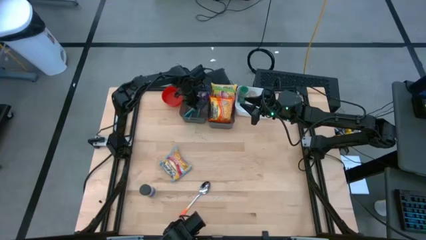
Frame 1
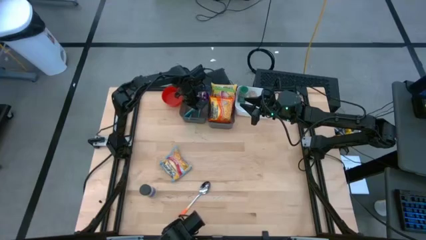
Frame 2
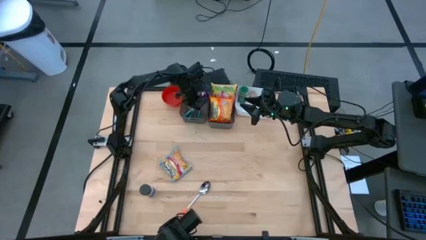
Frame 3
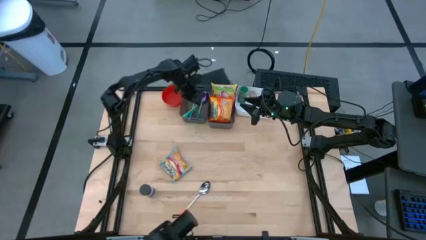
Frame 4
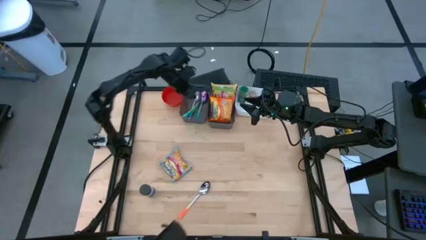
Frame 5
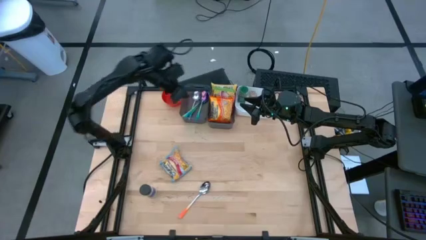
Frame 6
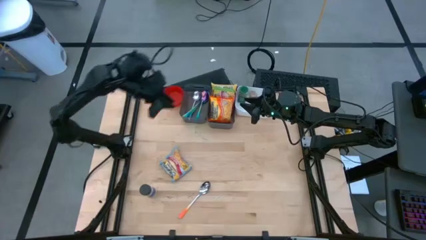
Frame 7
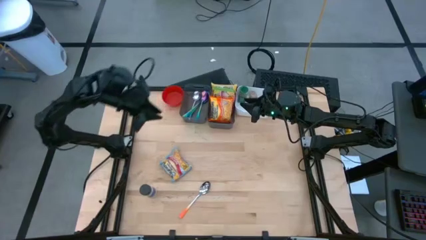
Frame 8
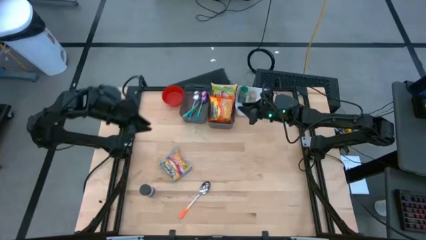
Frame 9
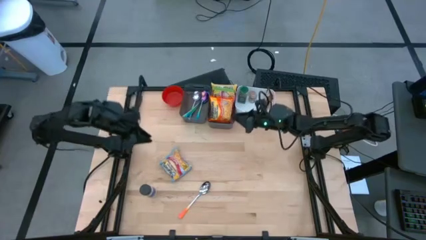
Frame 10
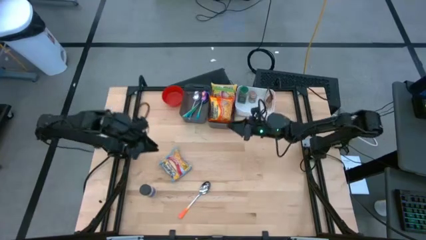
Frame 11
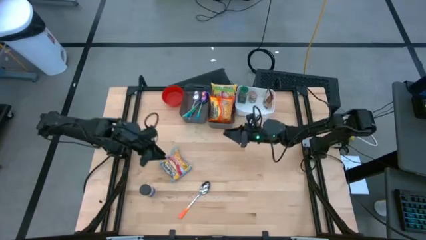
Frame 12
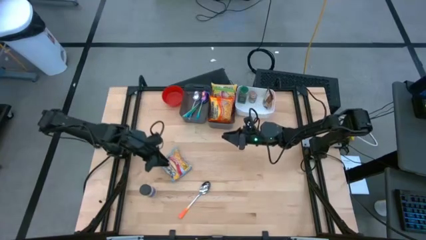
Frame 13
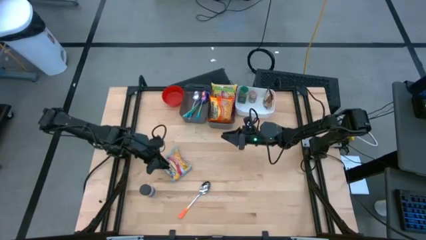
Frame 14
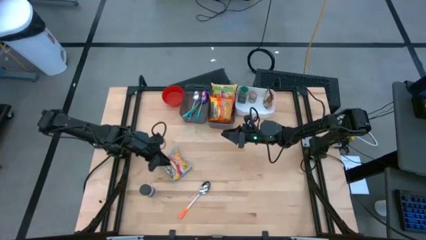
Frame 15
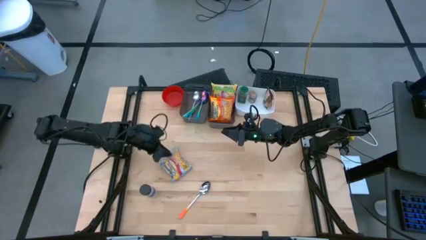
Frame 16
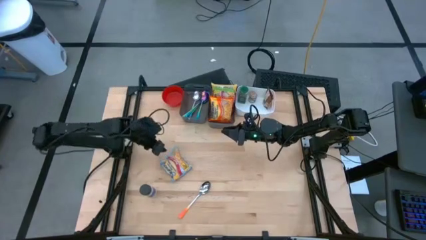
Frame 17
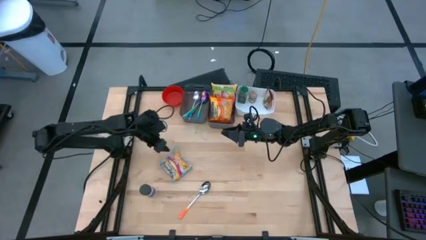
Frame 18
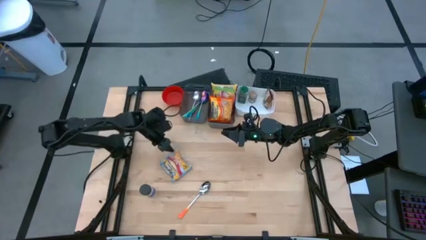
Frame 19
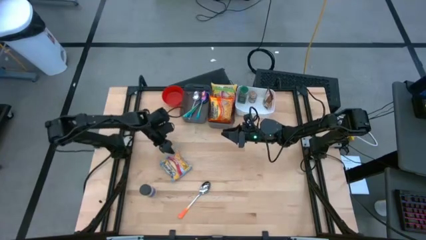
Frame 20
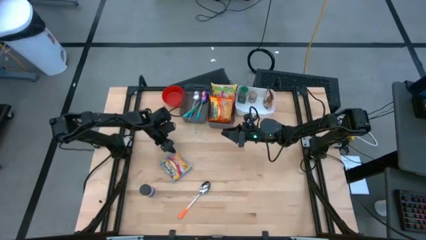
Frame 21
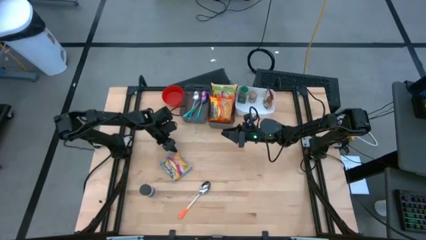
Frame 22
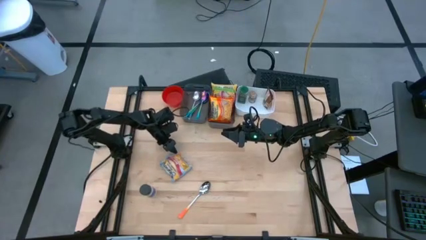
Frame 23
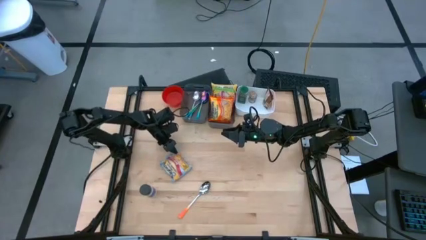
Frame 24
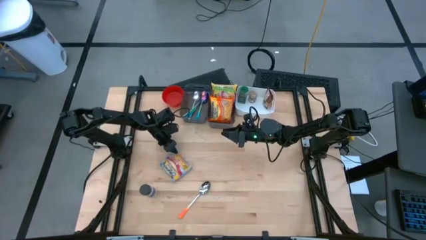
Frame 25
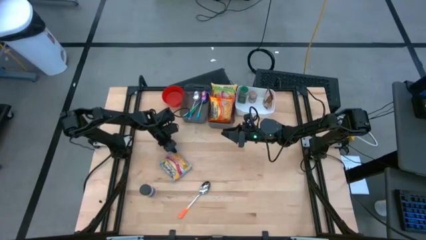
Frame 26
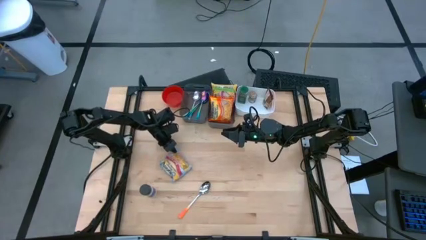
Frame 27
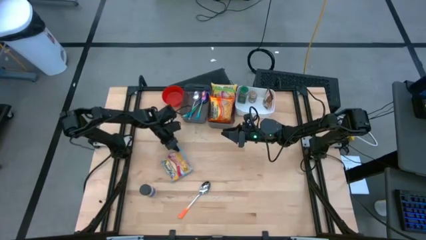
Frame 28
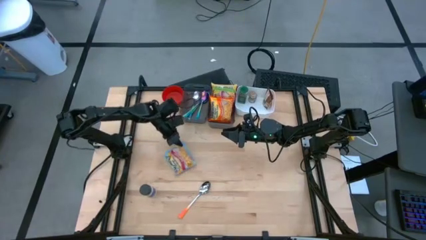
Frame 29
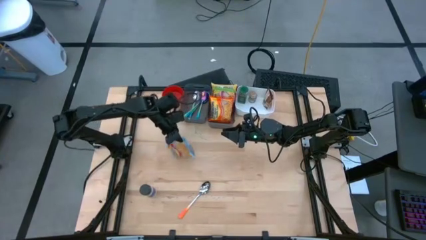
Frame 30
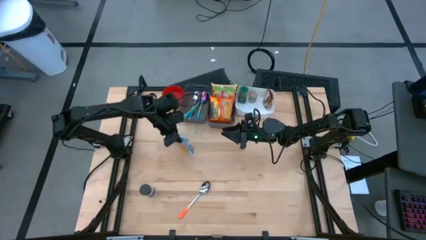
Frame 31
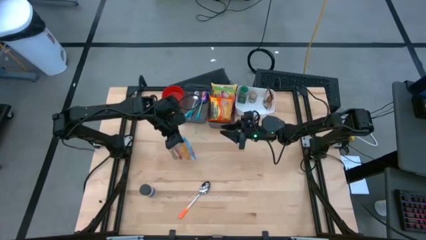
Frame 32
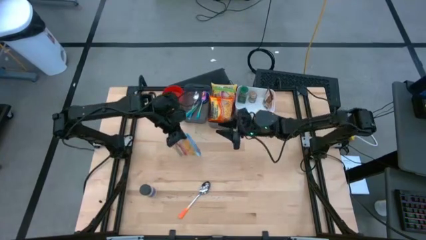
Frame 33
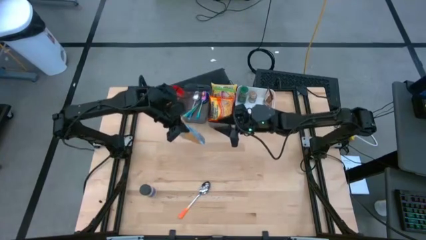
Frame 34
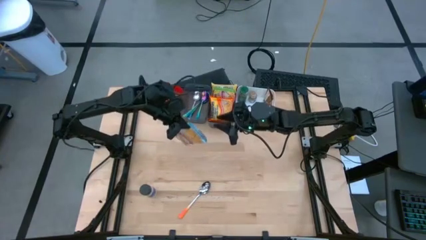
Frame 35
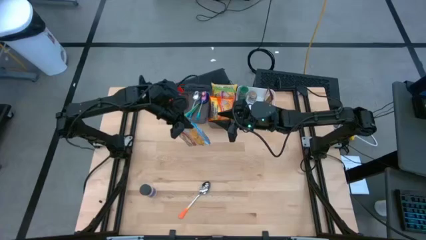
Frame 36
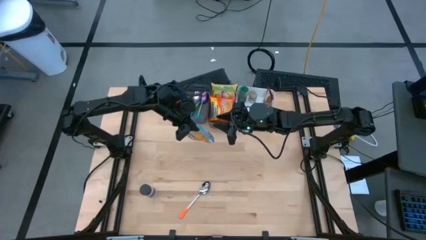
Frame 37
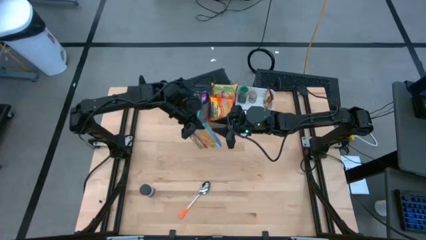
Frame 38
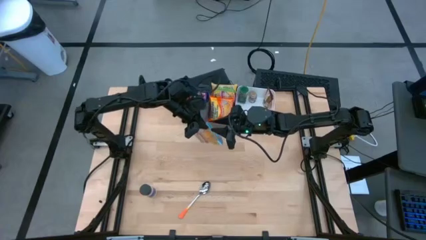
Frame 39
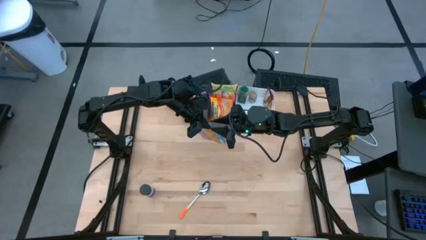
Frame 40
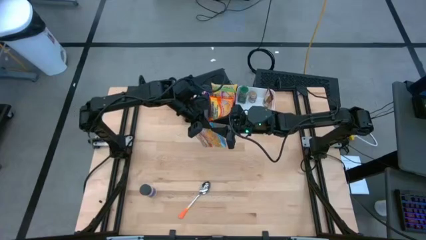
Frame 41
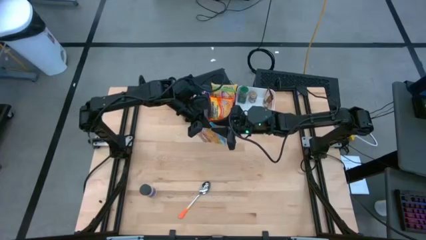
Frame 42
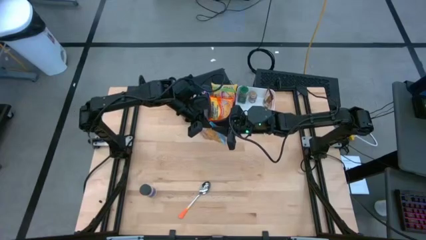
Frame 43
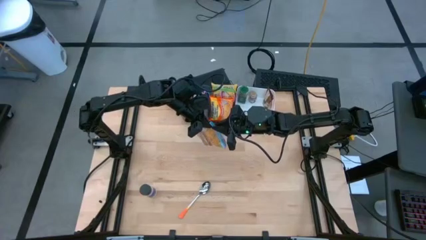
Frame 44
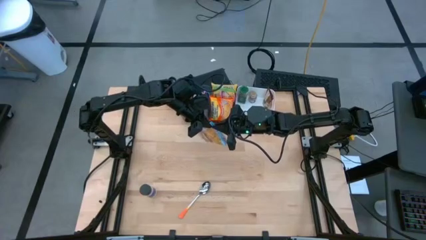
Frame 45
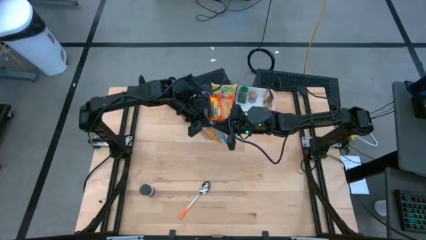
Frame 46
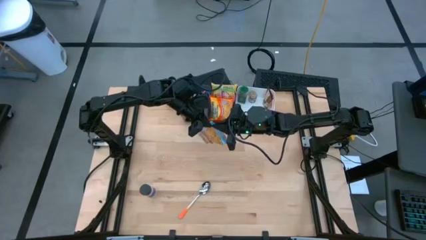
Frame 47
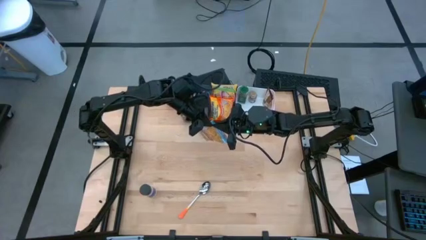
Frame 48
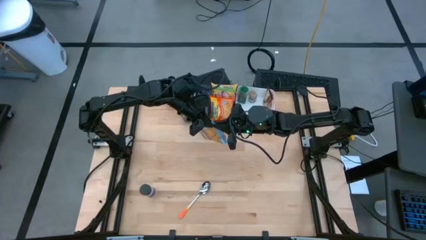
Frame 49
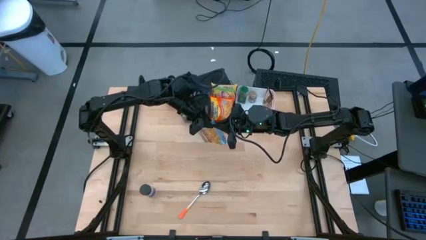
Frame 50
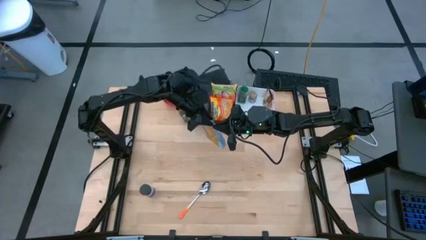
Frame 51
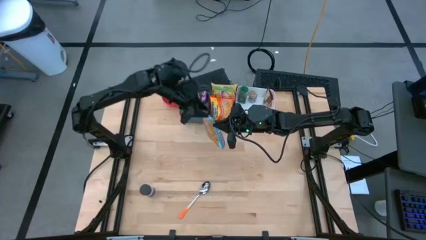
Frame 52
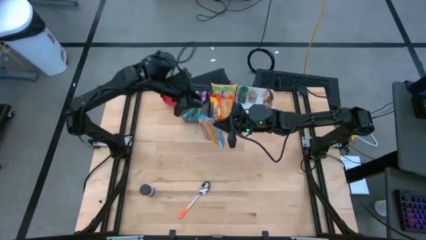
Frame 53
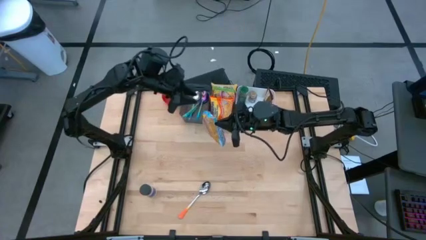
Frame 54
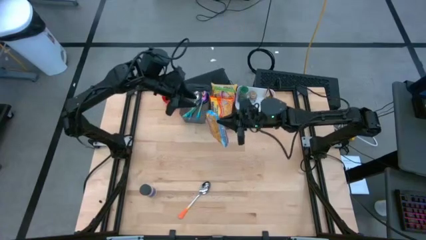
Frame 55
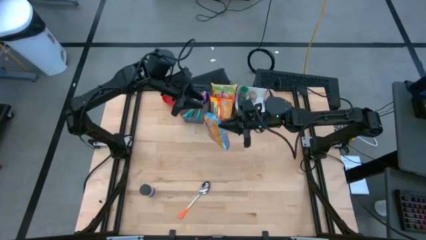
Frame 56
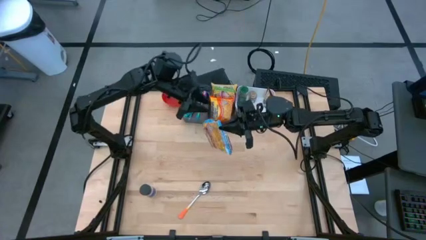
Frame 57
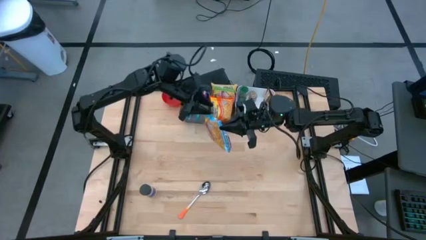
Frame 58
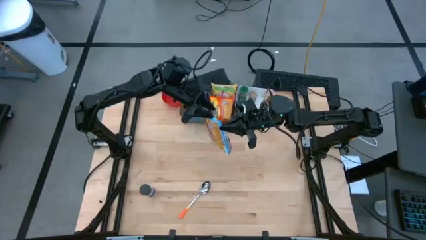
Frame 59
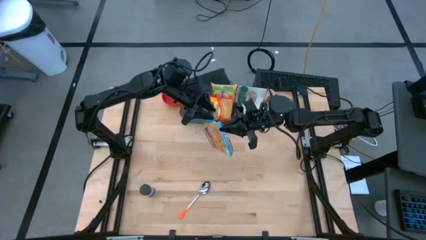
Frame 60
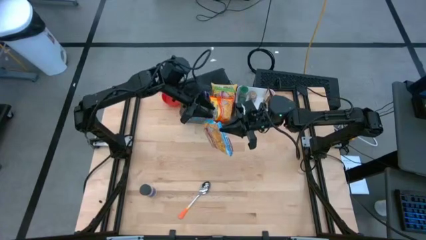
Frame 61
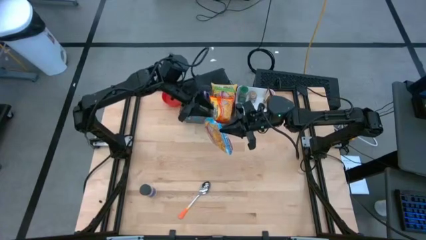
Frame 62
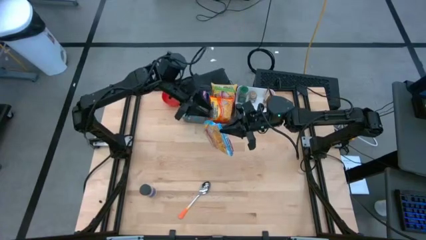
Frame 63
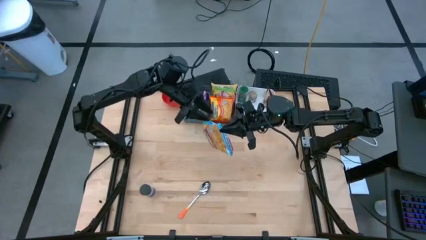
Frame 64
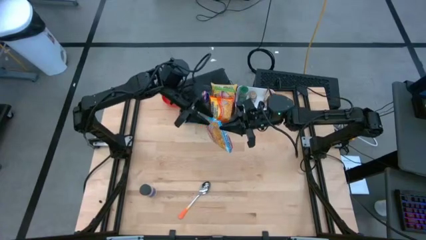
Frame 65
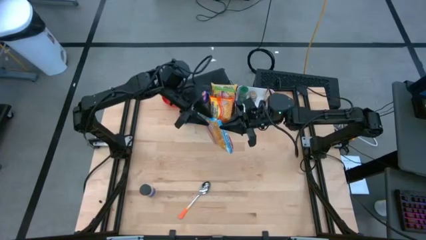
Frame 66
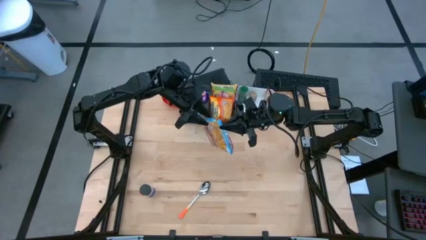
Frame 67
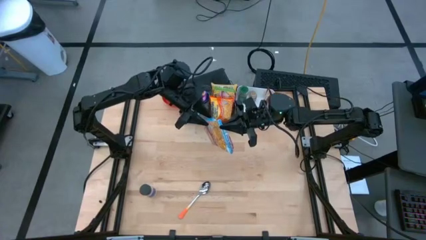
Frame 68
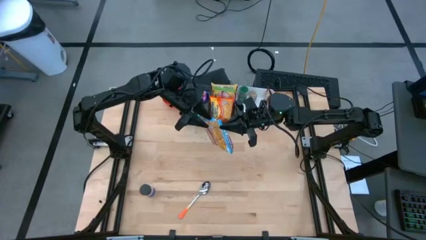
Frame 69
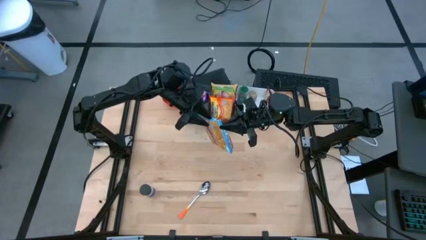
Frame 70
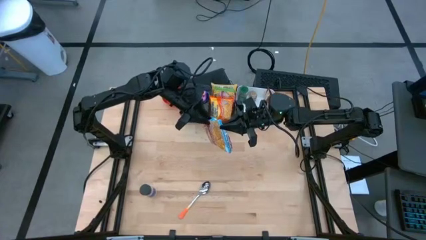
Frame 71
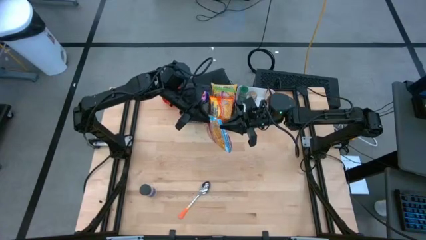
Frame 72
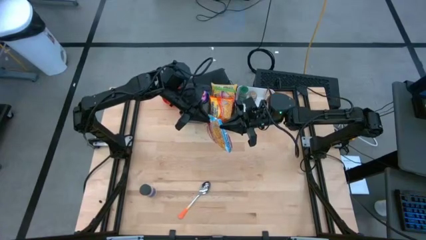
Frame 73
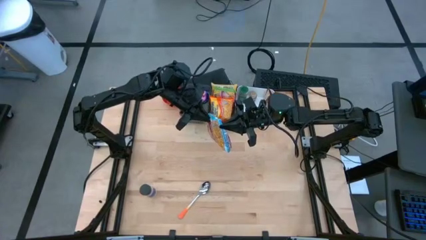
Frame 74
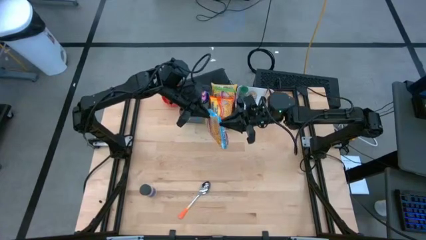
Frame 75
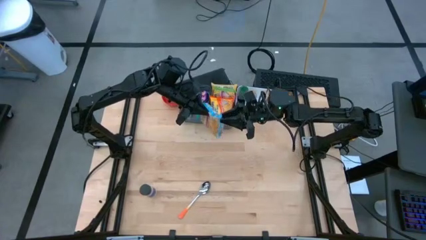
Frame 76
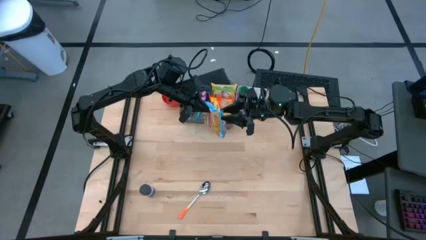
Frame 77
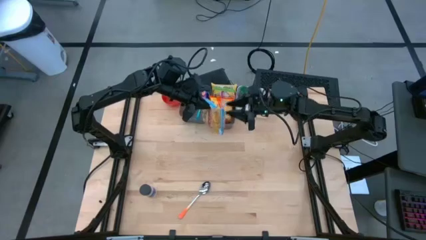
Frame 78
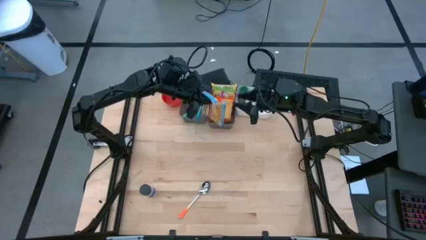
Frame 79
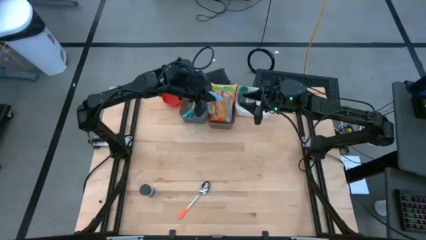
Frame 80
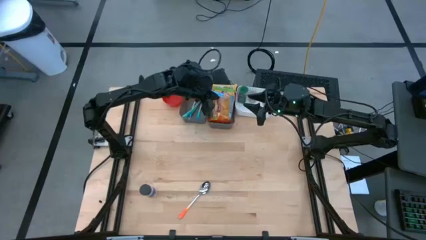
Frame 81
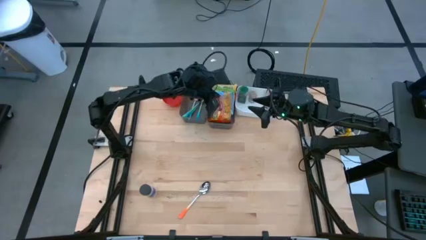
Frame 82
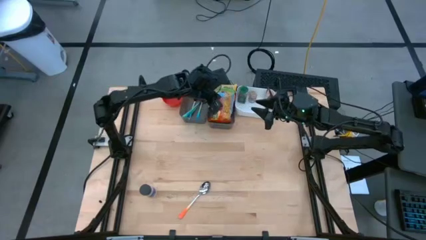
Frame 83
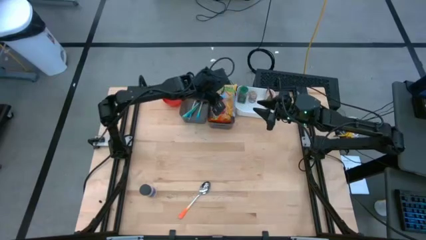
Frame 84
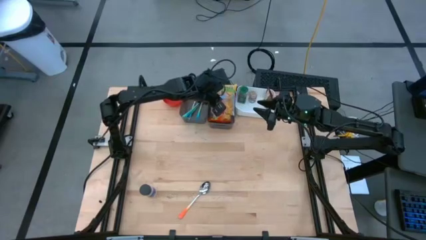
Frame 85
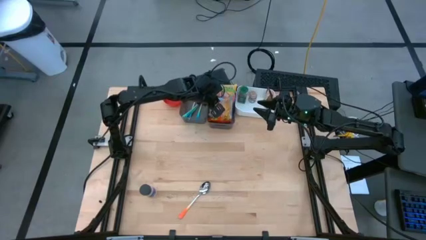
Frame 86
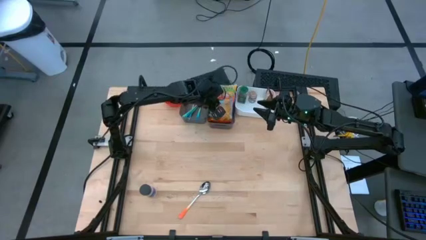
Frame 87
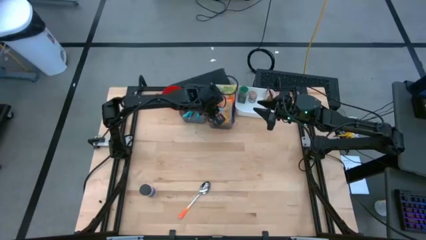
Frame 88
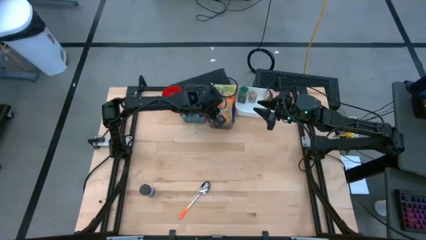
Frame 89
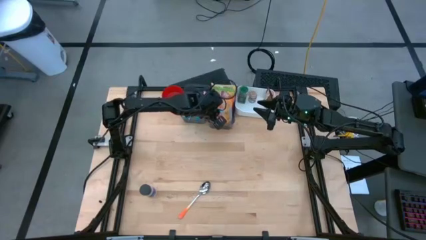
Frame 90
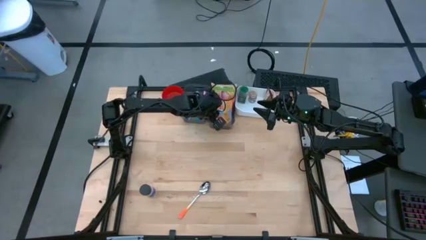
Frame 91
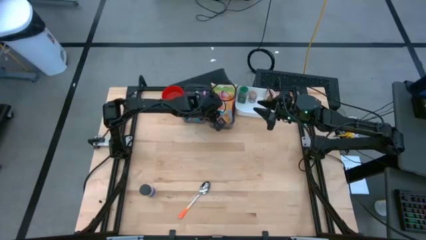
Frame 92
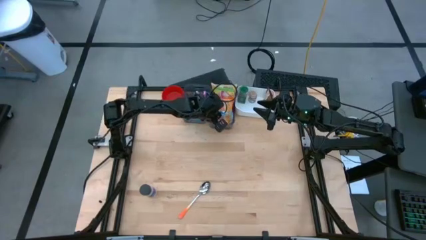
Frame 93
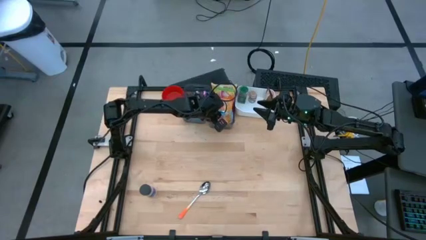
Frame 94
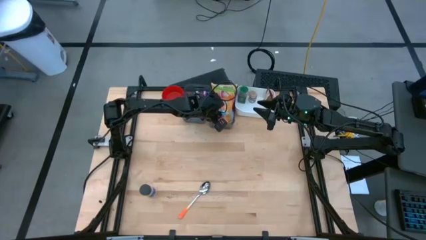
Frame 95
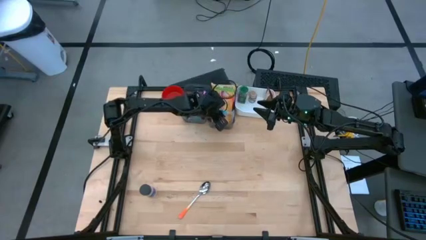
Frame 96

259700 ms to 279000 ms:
Task: Pick & Place Food Item
Put the blue noodle pack into the right black bin
